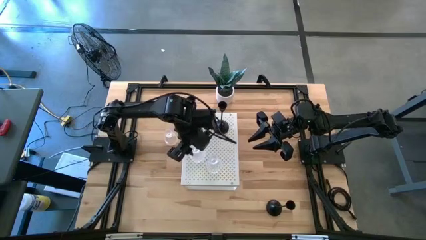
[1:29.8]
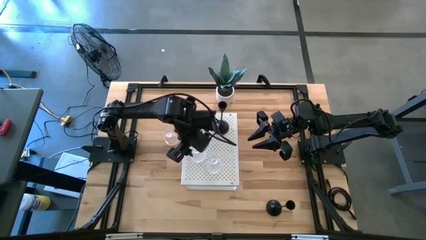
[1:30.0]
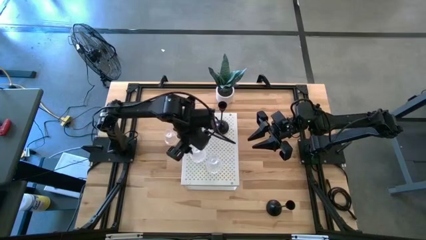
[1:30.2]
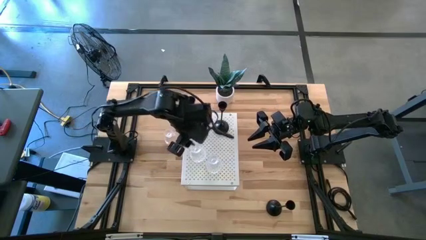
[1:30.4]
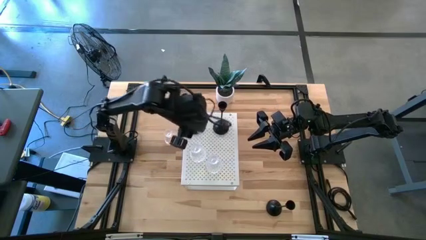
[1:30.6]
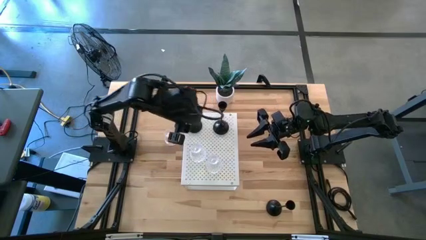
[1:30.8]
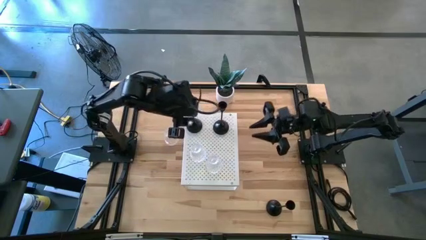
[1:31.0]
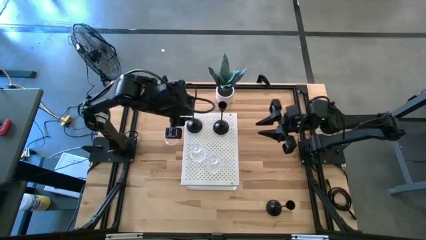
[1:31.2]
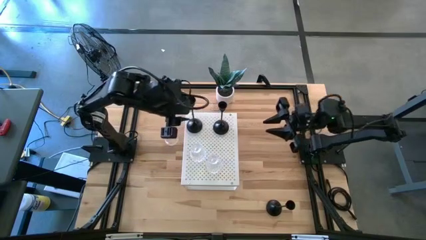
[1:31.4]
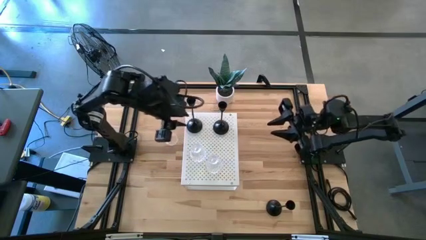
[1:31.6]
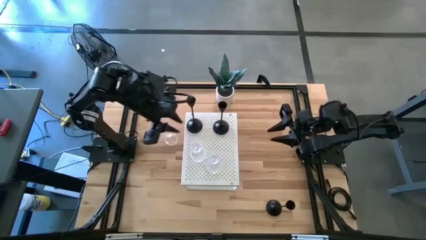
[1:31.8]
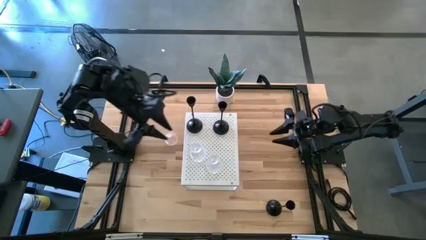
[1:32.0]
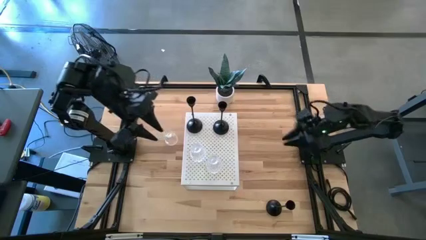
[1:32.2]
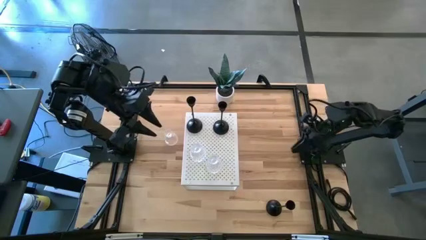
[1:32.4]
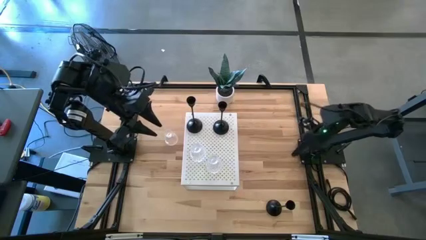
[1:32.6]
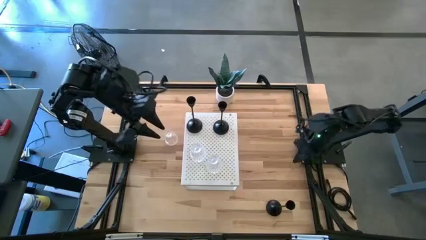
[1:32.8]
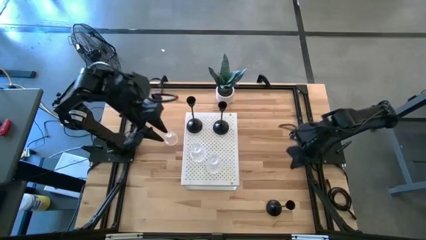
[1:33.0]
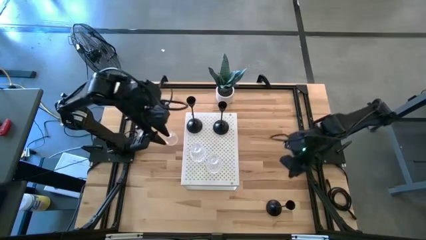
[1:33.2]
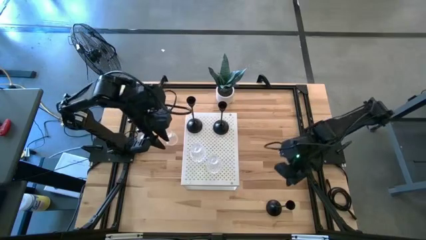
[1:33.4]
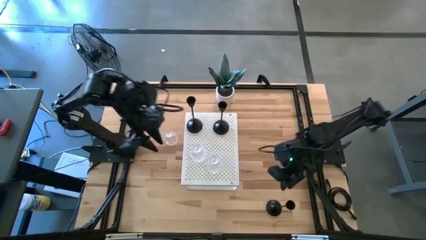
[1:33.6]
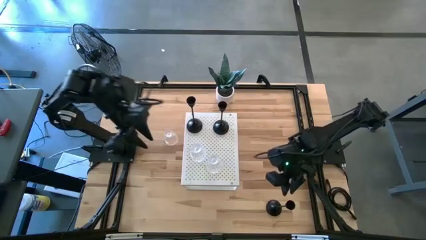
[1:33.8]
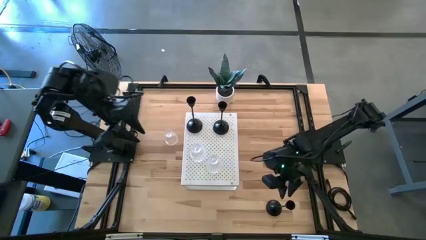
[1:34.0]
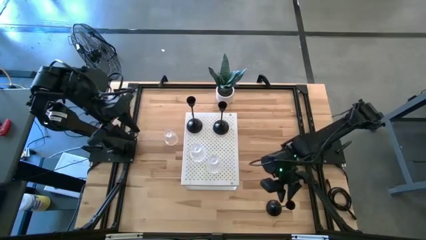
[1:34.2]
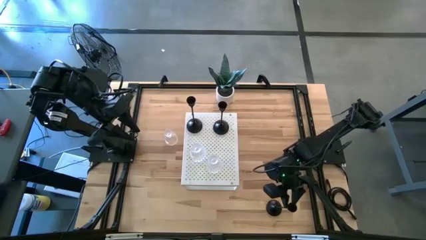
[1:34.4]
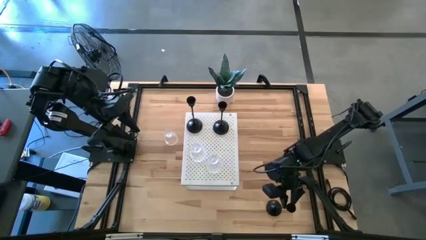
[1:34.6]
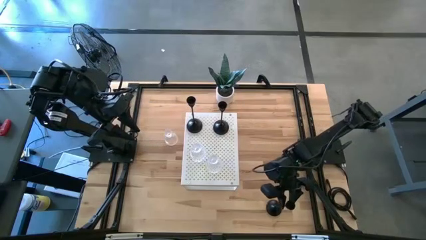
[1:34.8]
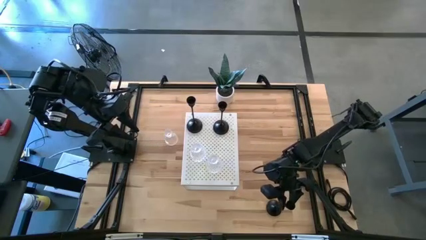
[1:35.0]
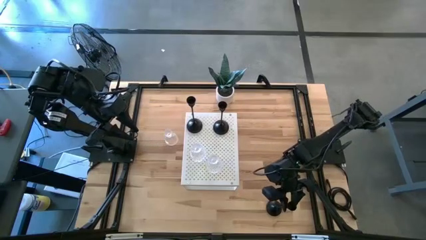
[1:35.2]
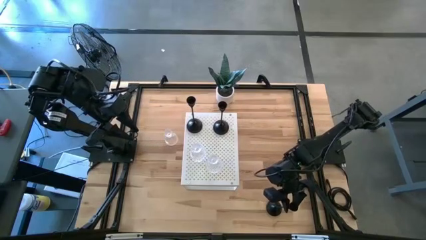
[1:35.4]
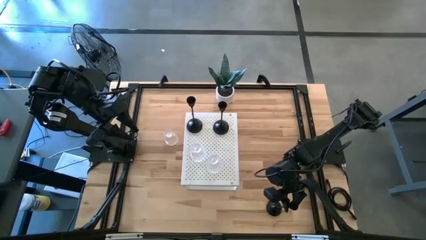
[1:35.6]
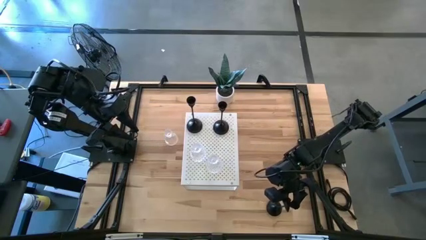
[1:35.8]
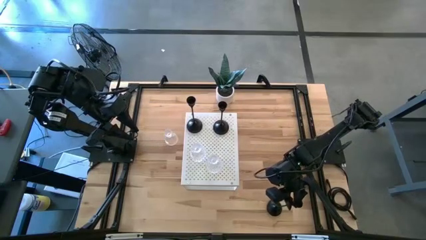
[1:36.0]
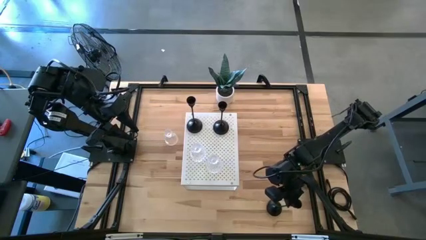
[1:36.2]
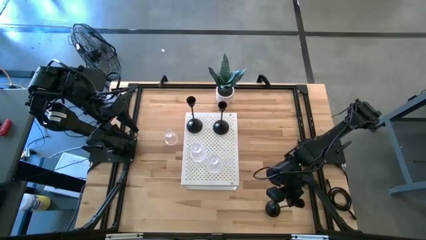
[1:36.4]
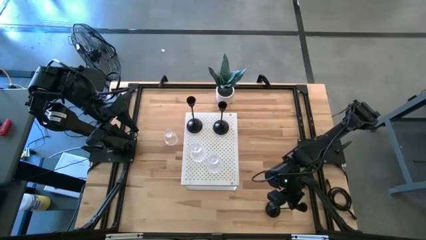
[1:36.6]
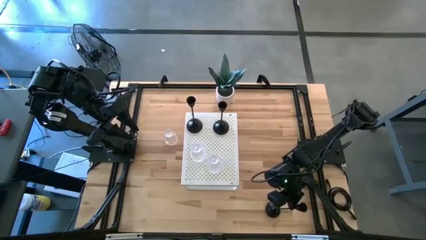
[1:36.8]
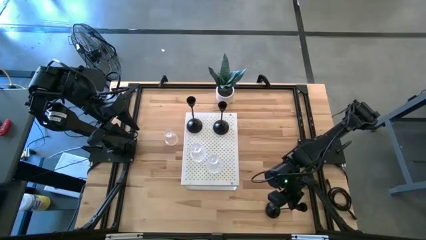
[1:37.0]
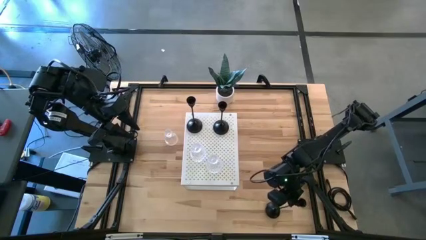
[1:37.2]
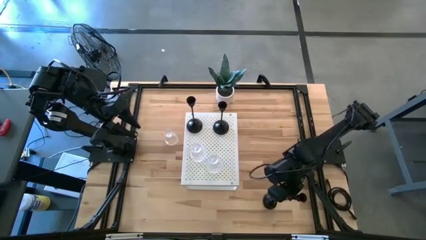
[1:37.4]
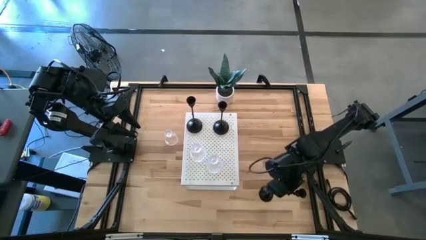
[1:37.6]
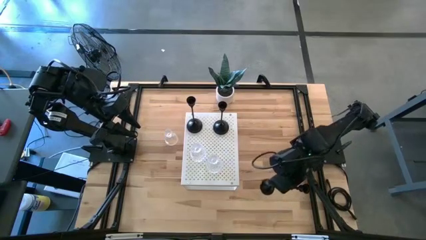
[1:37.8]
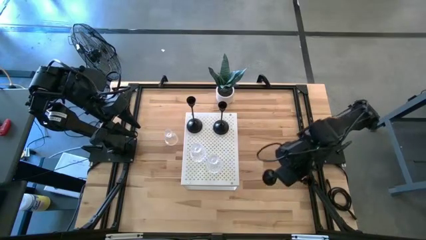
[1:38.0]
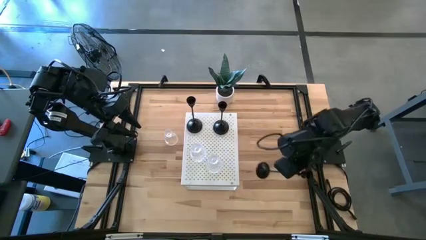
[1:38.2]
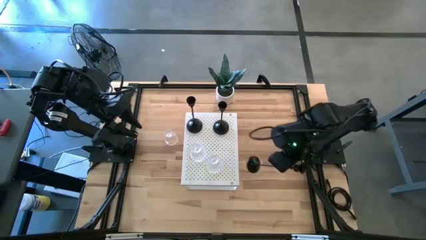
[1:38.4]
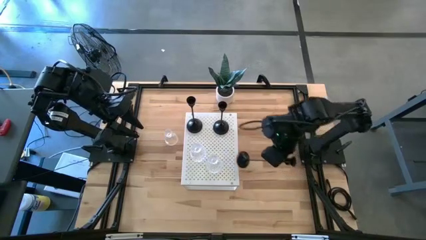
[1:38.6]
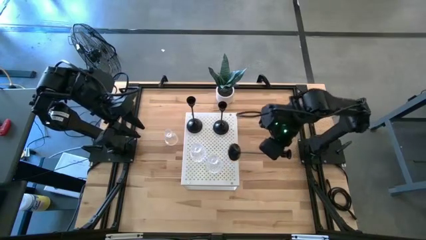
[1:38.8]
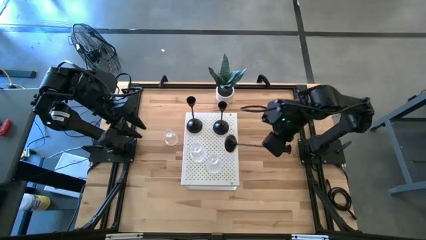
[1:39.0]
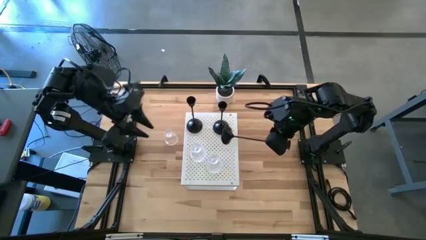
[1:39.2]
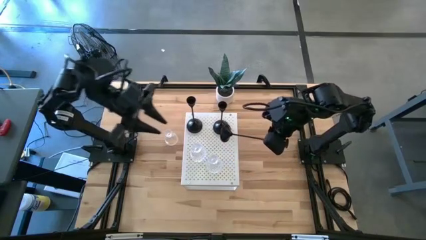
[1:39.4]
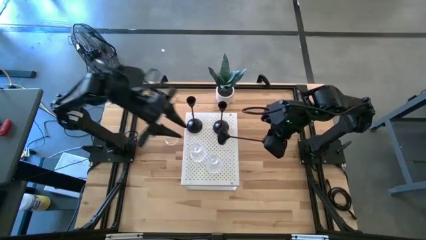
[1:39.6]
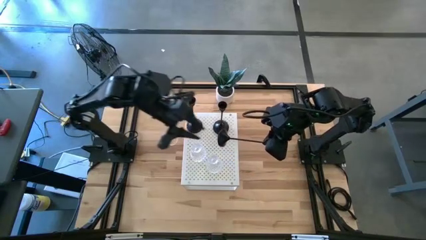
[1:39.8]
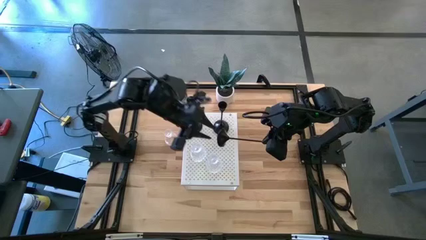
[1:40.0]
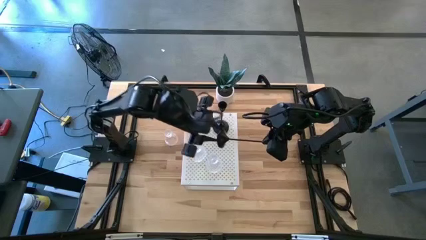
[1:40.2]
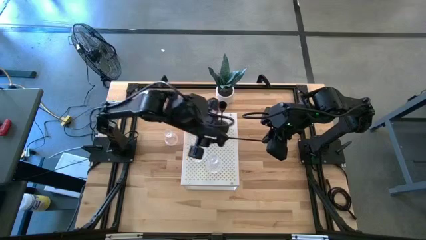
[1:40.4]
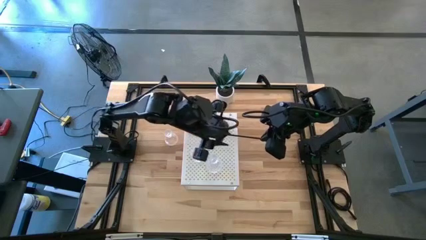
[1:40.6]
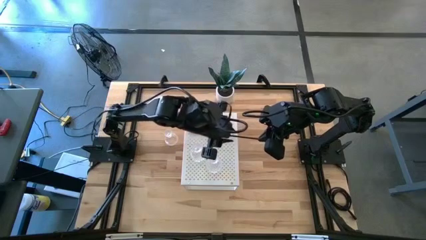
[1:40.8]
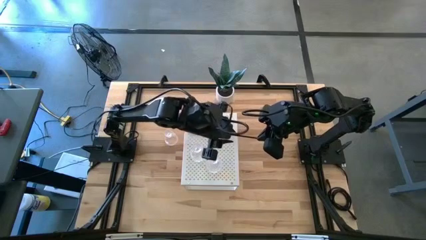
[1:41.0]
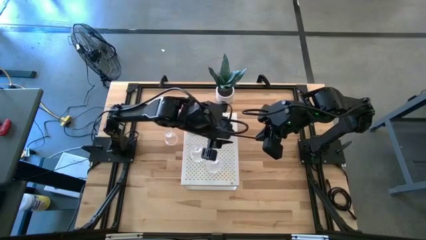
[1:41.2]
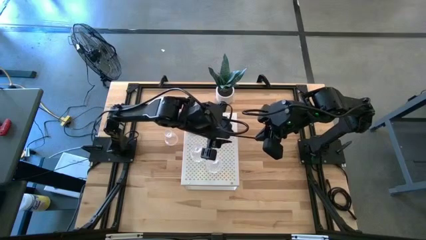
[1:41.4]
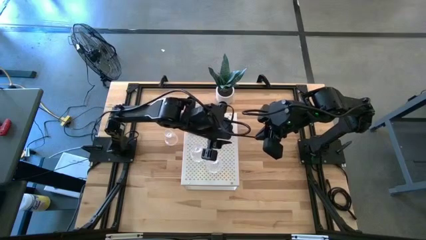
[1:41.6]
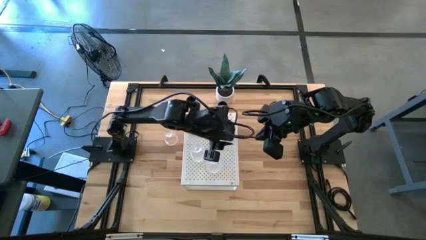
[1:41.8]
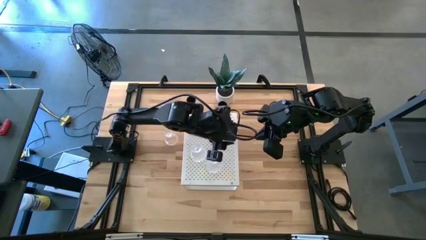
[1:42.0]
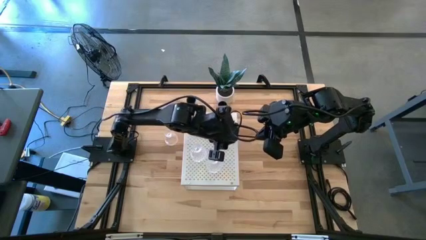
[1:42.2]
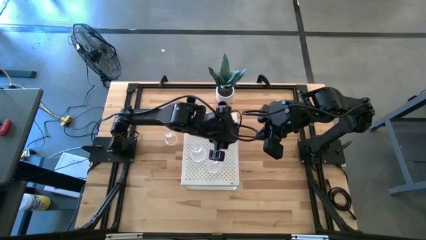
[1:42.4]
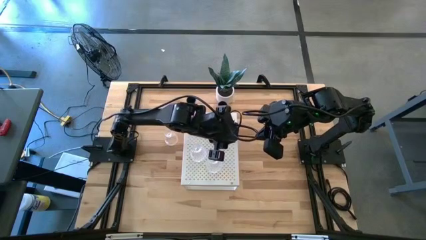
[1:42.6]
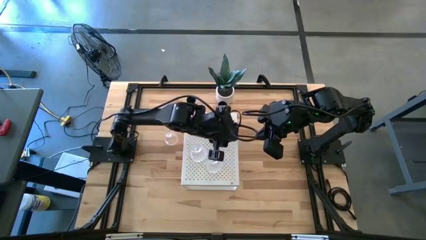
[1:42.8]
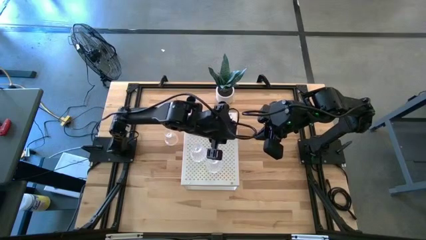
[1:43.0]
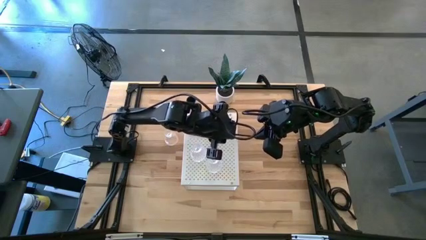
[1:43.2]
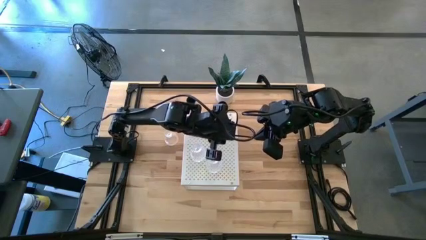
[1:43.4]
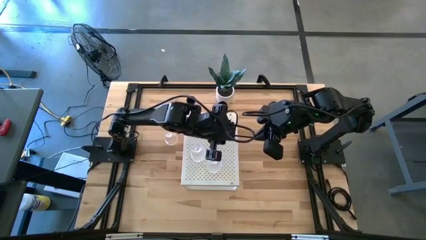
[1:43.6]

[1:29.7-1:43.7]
Task: Pick & Place candle stick holders
Put the black candle holder on the shelf

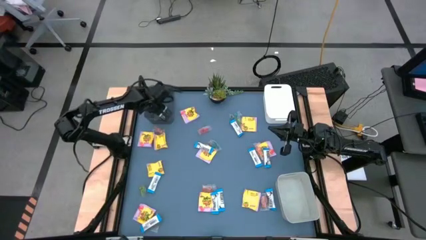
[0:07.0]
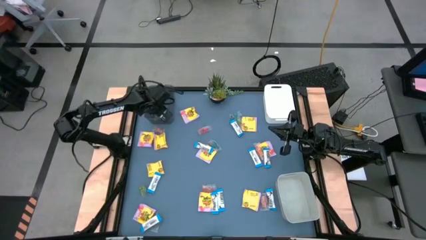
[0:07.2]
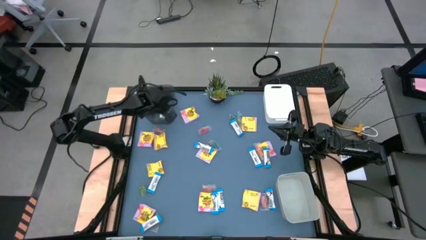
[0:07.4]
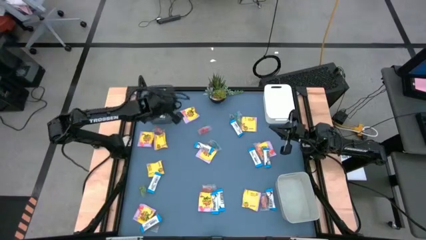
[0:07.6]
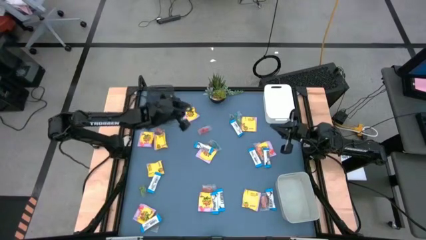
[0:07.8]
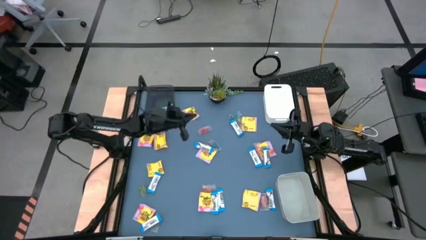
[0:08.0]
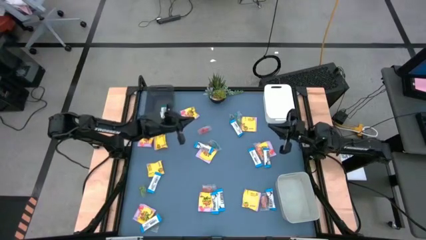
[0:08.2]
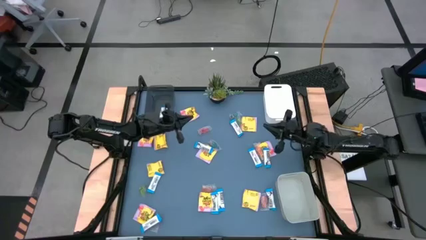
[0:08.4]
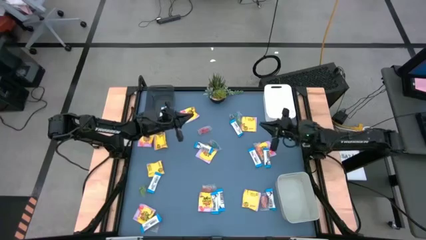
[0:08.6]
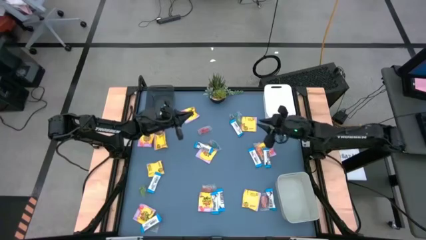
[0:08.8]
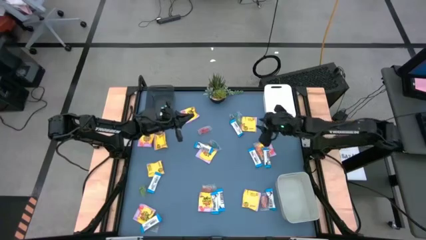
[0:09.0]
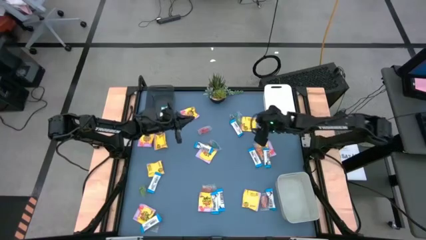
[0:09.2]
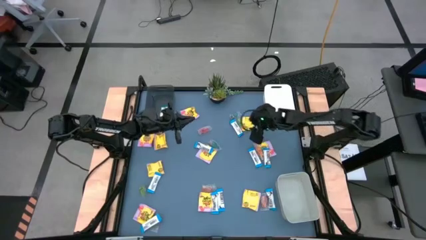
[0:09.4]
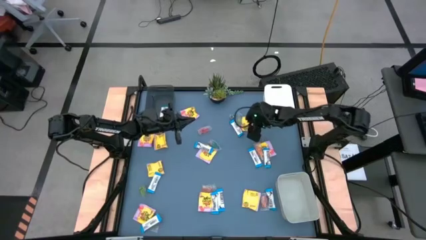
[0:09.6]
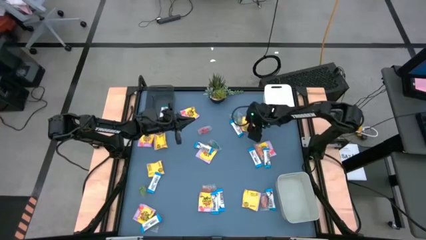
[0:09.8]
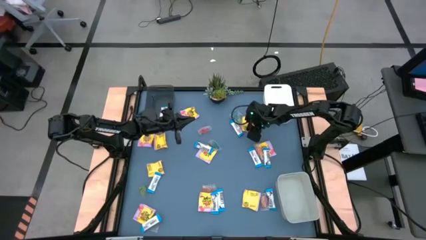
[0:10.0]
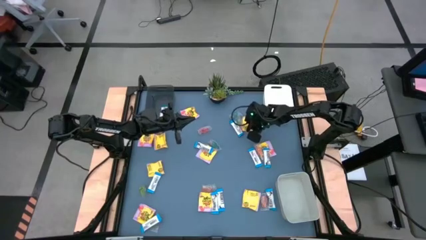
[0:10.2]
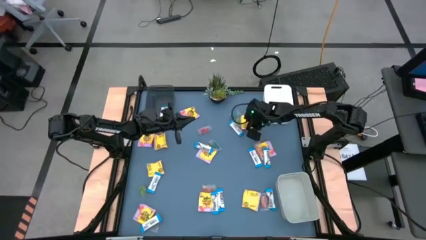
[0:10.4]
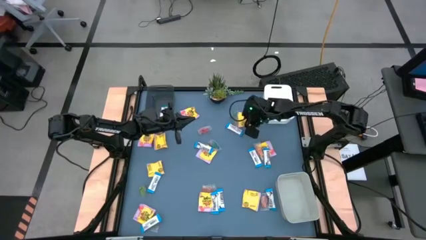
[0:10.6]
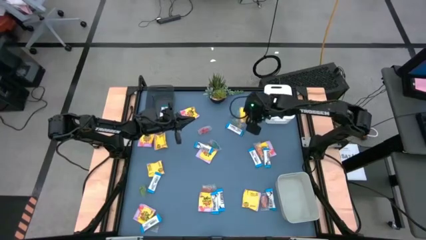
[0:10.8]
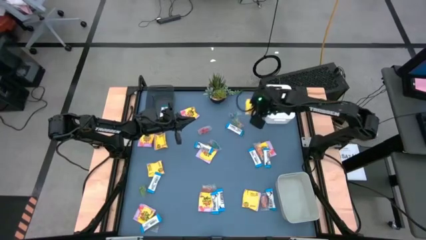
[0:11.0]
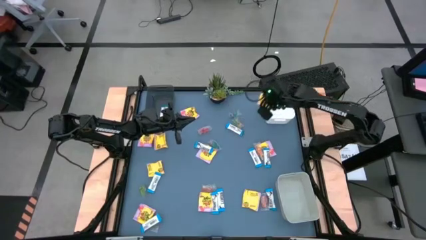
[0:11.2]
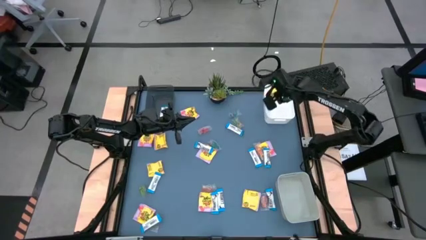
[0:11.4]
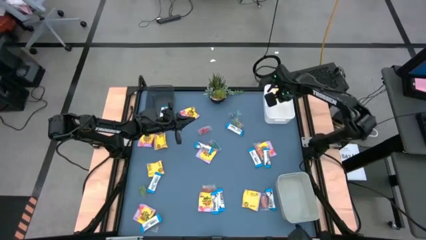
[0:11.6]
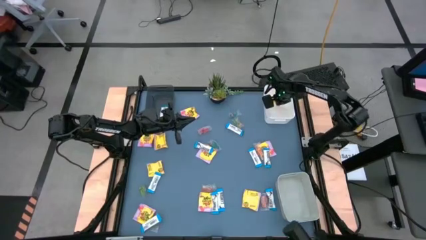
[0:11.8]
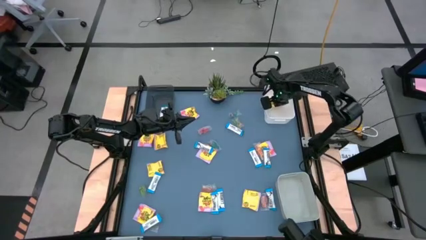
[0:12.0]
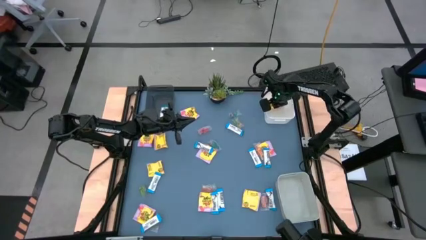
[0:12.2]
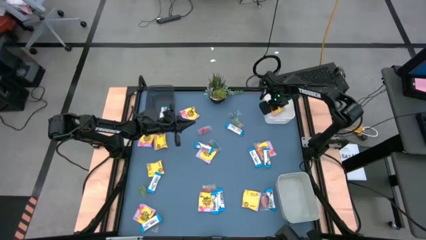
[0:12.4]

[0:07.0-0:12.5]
Task: Sort candy
Put the top right yellow candy pack into the white bin
